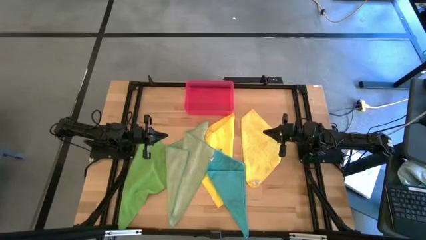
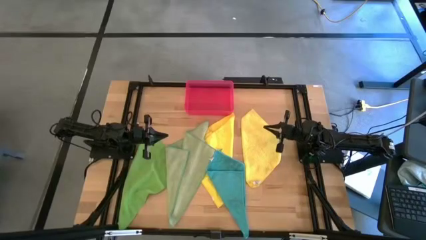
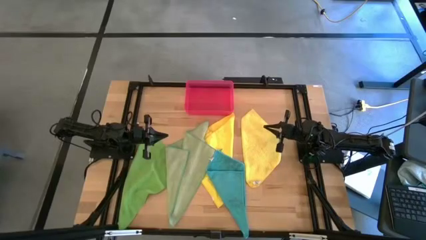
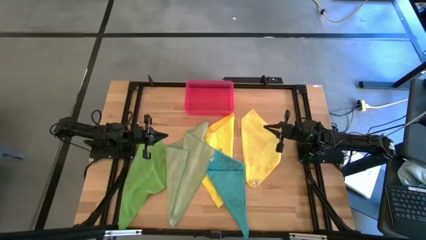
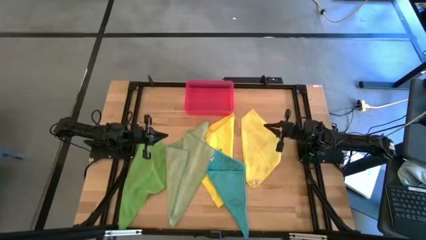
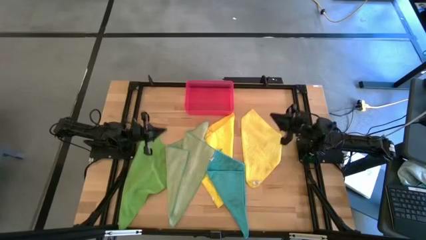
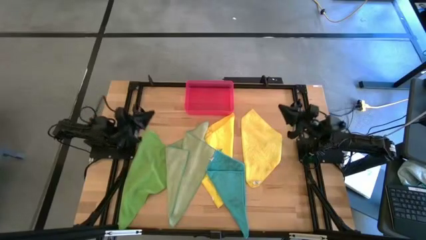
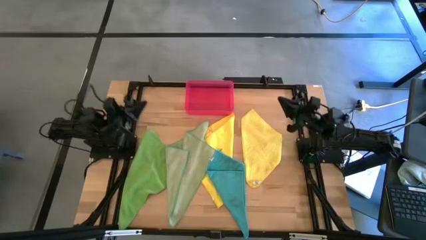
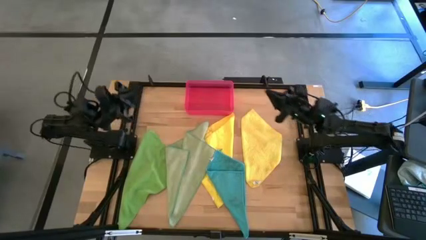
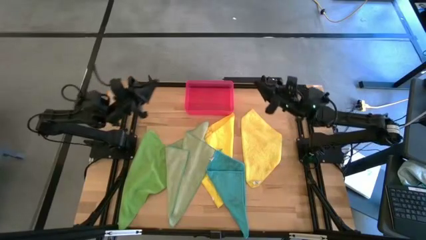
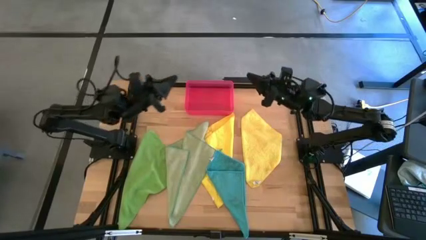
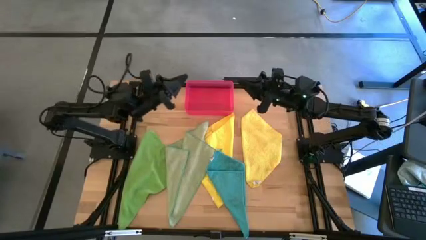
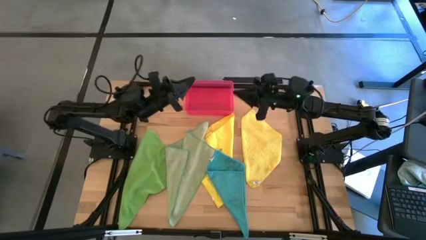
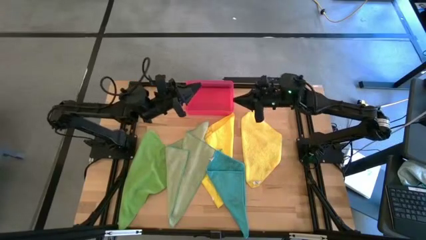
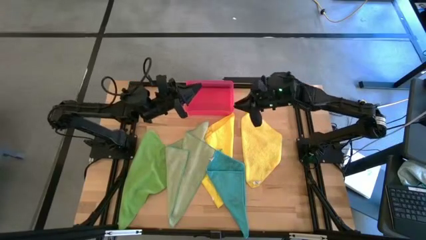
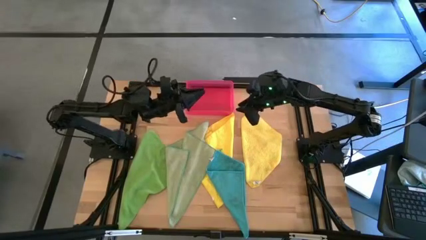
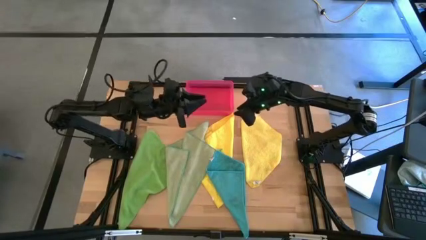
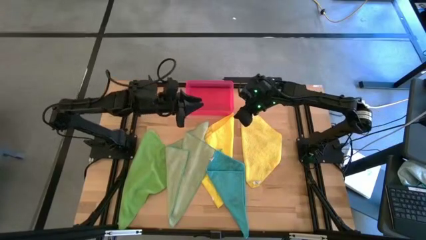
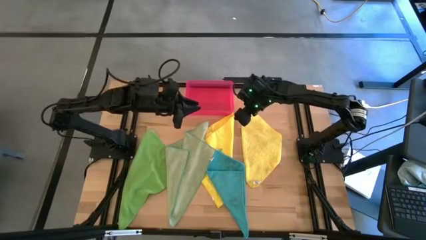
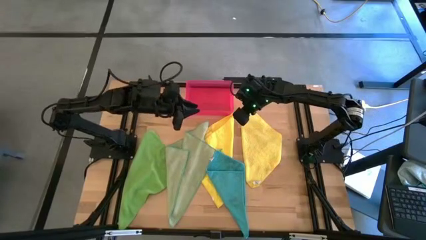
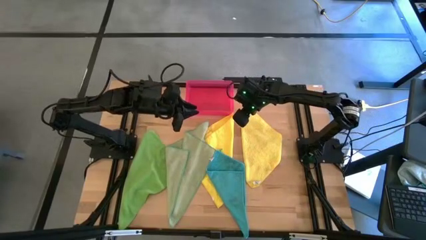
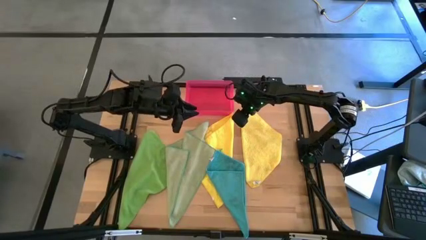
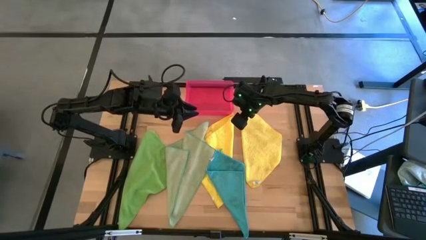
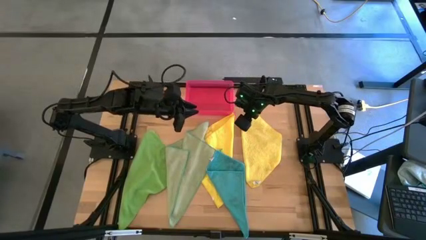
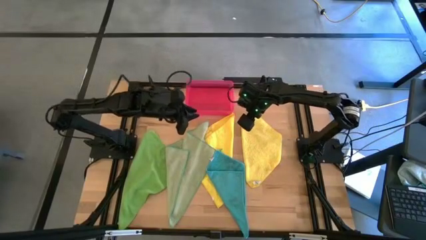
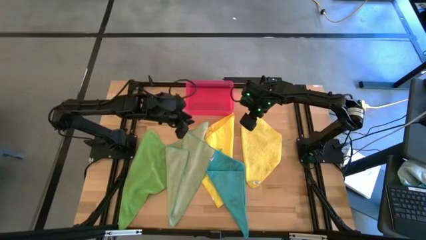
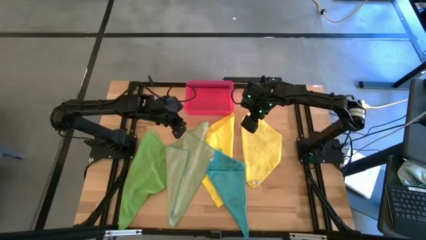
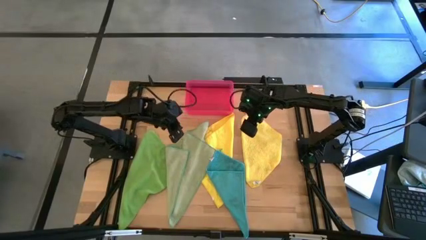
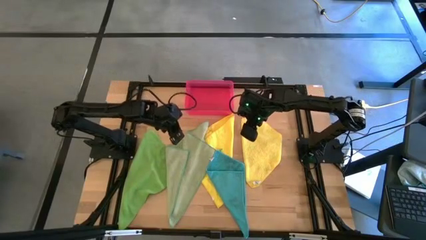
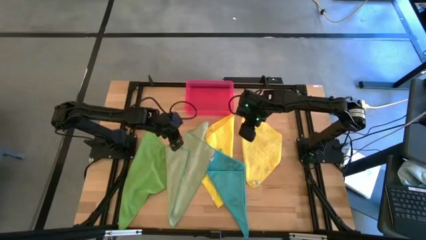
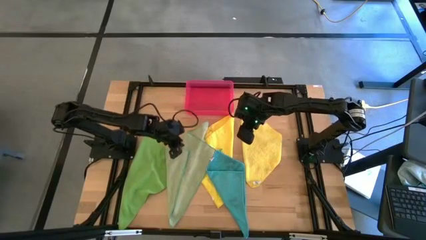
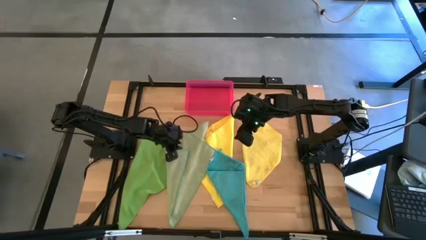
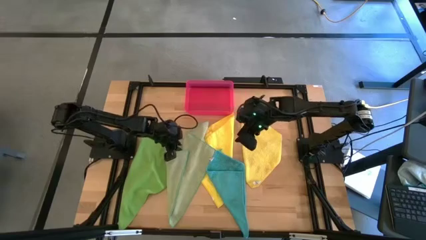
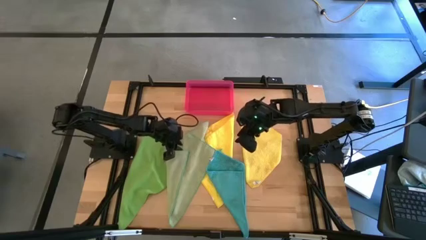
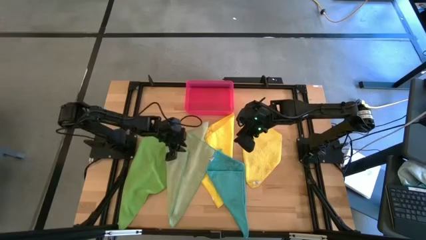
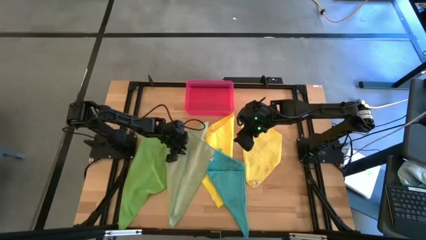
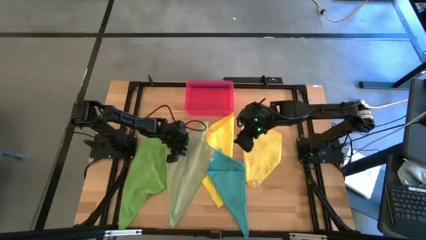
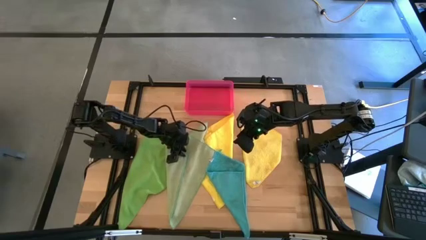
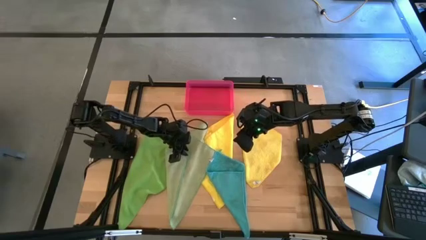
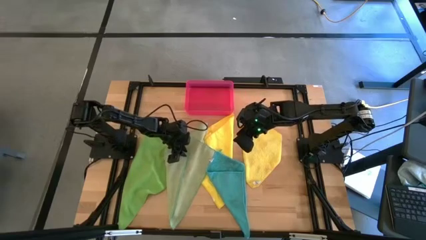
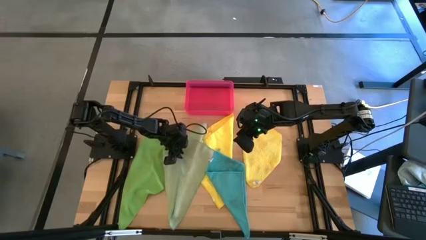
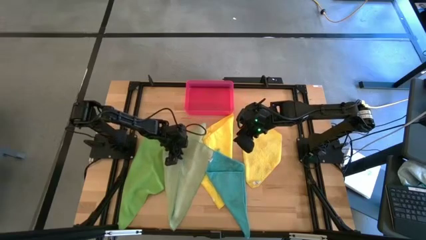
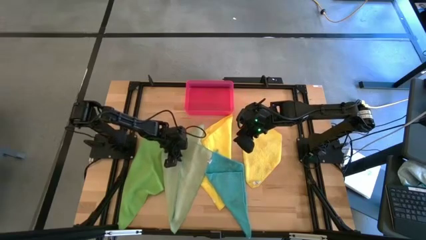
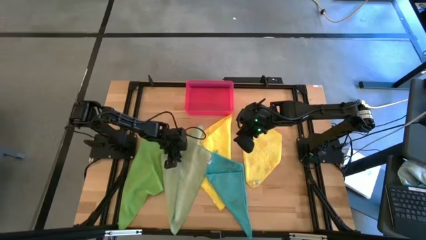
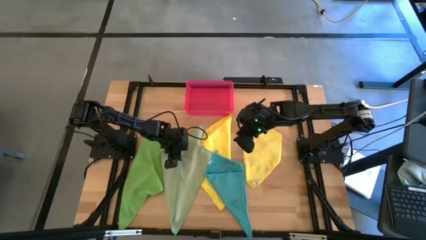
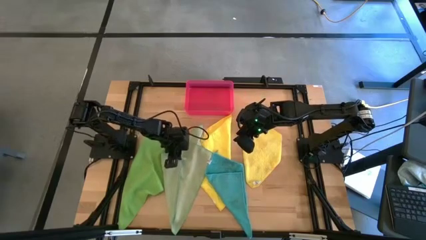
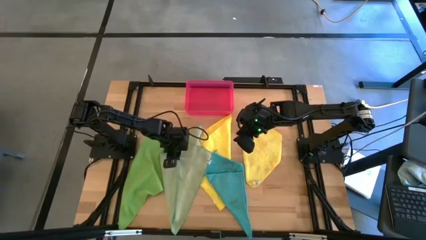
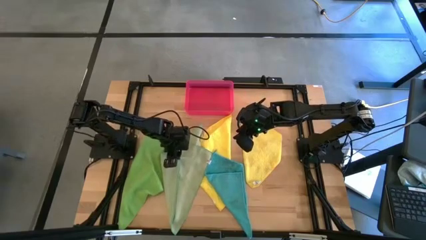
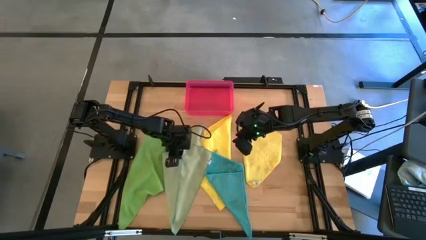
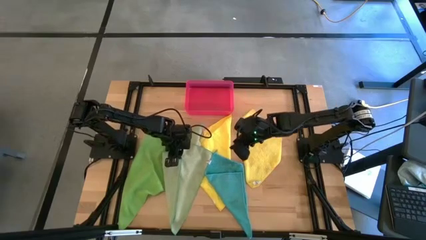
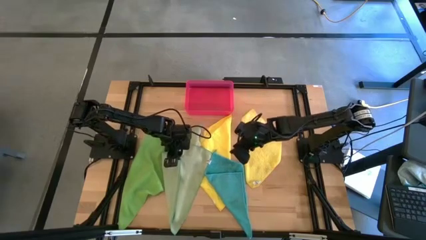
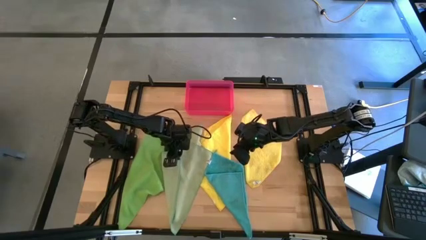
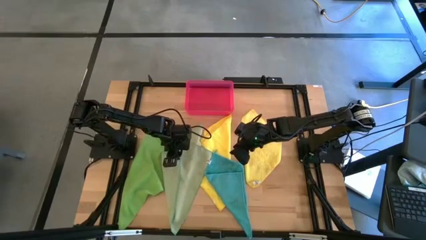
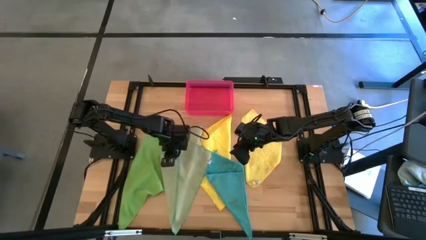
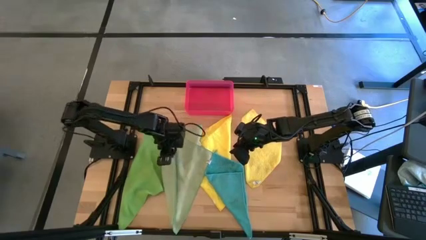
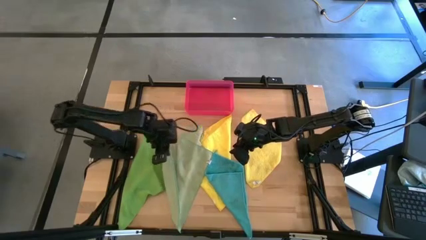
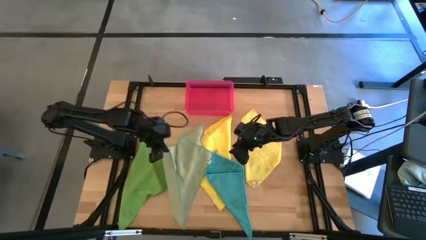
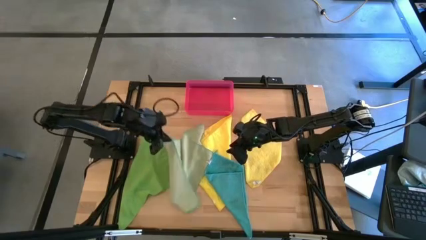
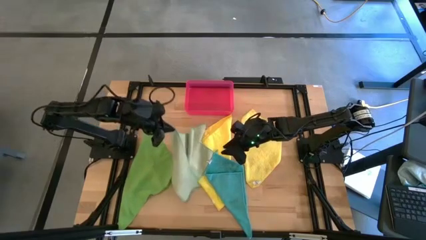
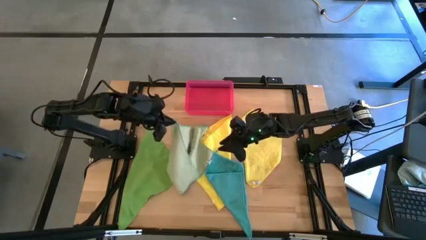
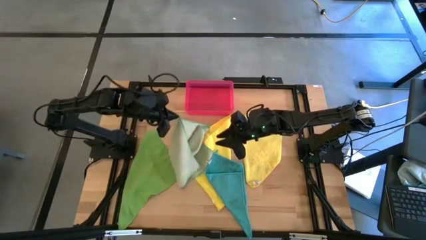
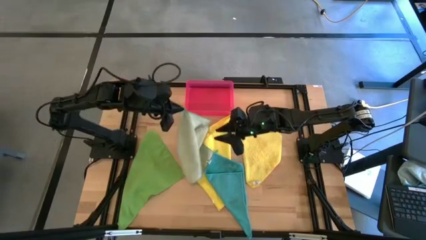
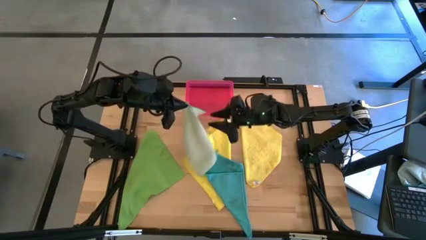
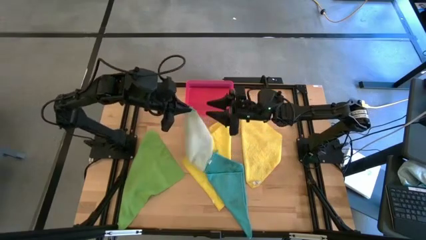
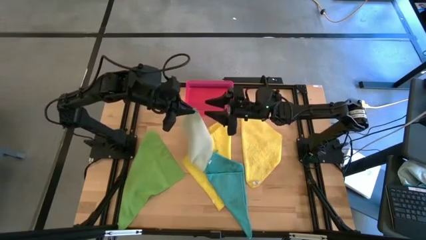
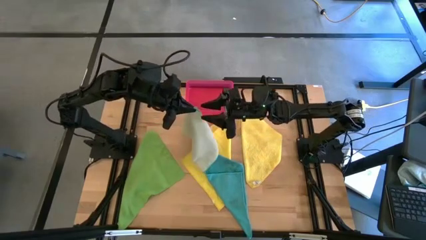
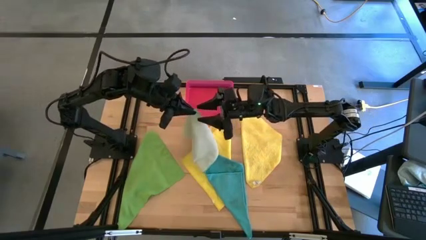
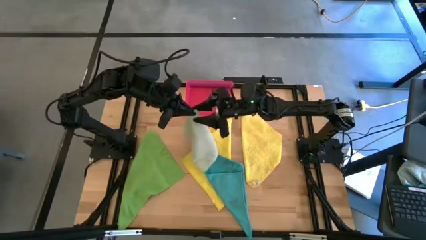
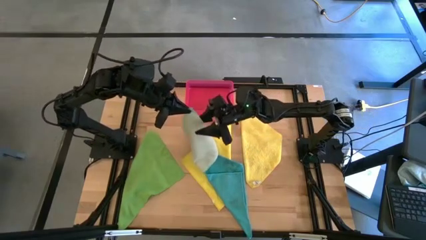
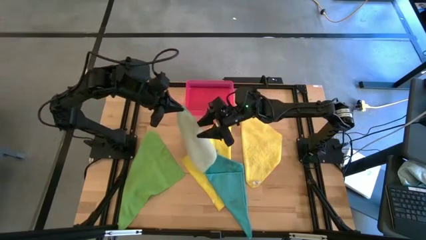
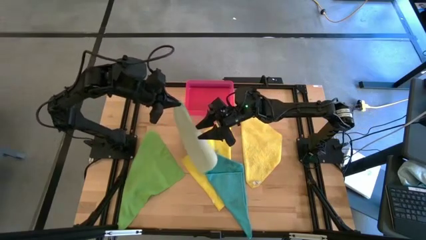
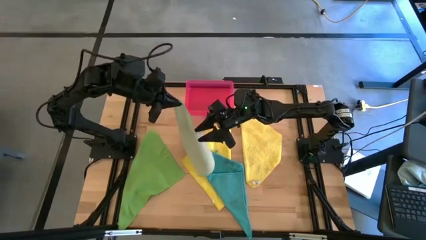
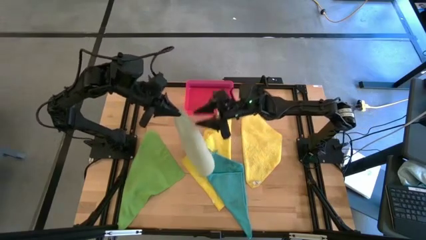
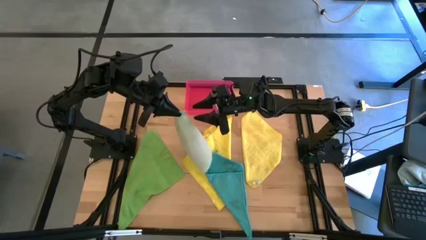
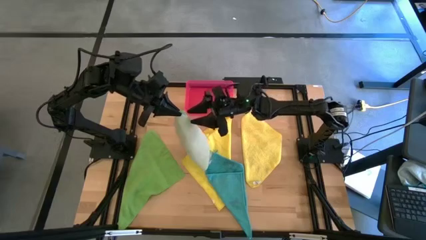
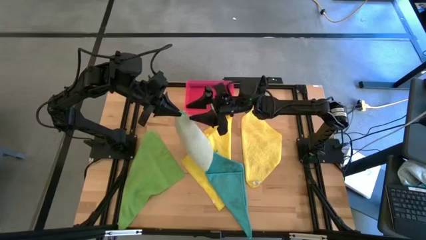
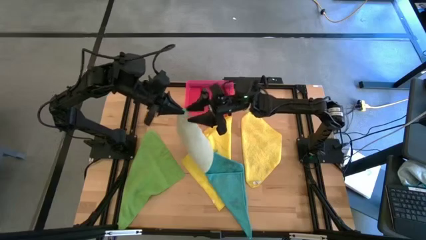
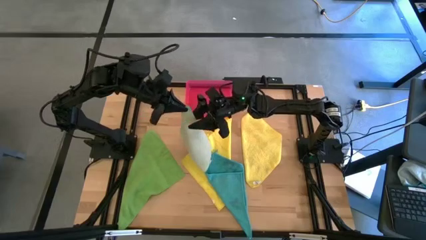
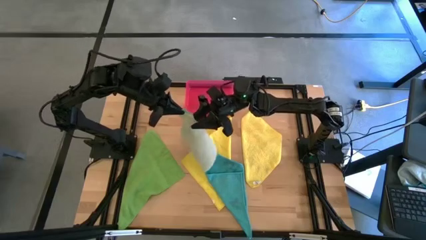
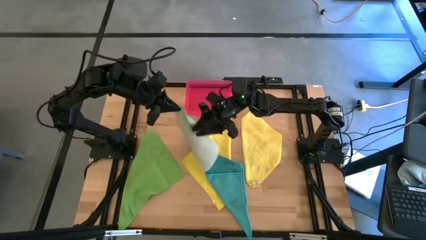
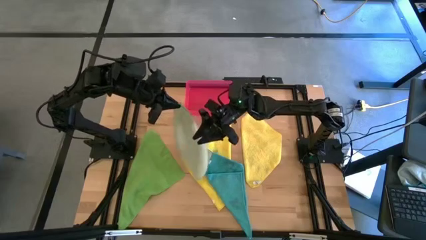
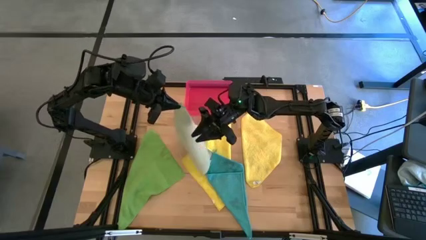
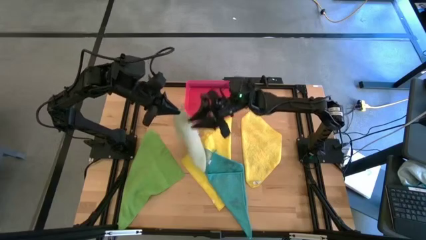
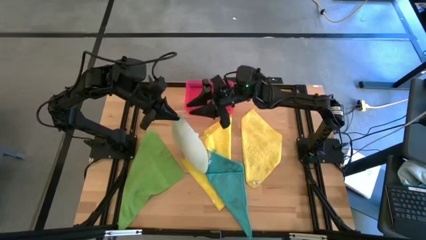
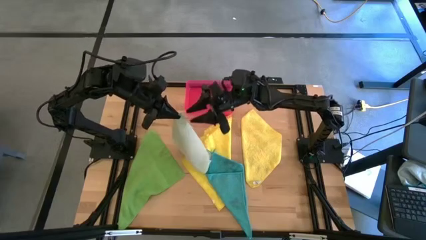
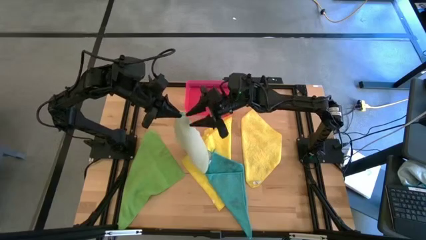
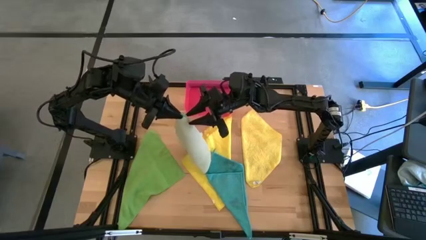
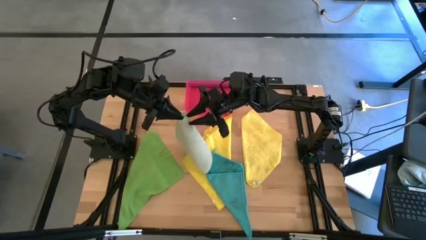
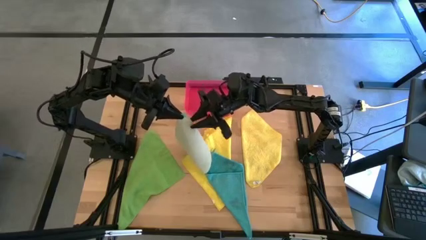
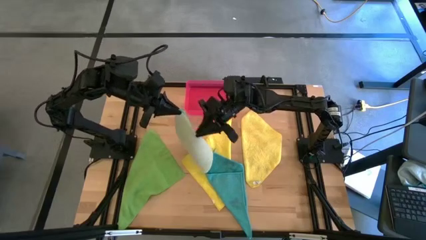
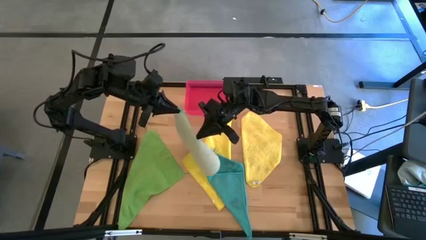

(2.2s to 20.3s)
Task: Fold microfiber towels
Fold the light green microfiber cloth
